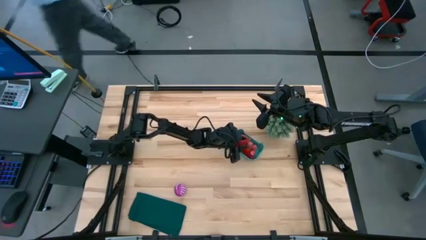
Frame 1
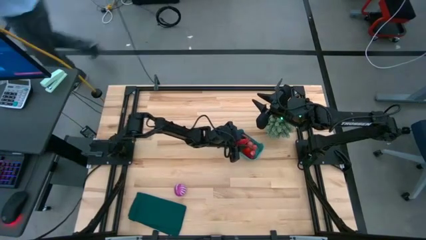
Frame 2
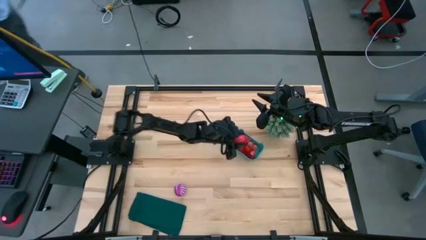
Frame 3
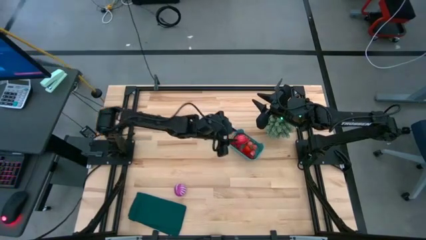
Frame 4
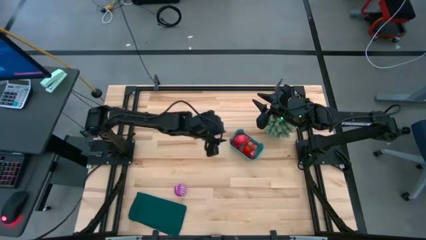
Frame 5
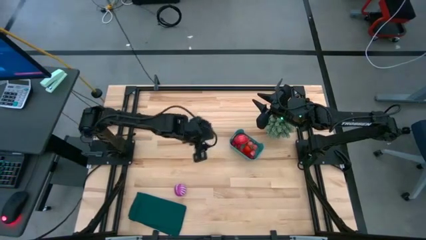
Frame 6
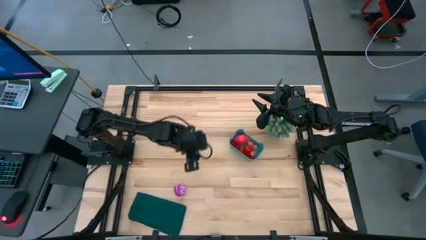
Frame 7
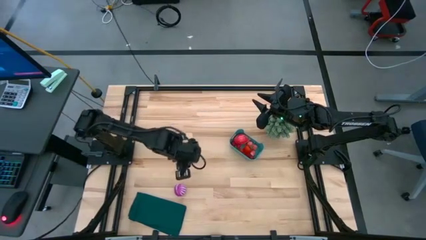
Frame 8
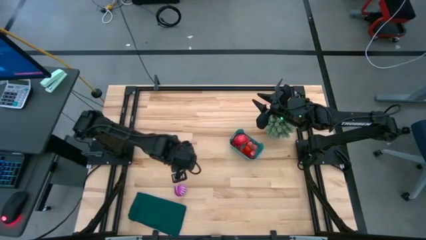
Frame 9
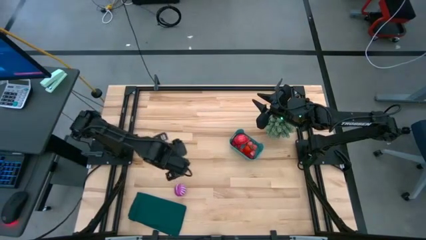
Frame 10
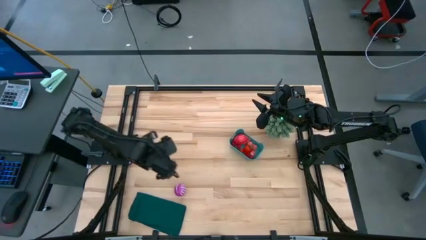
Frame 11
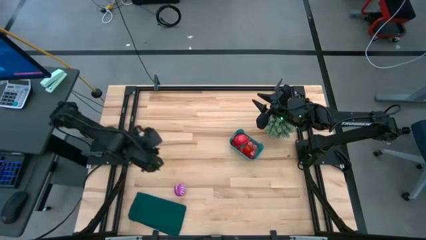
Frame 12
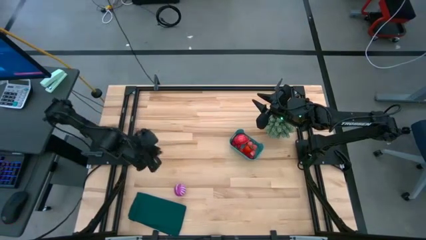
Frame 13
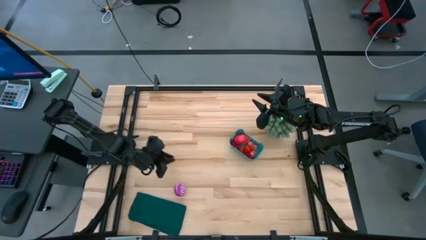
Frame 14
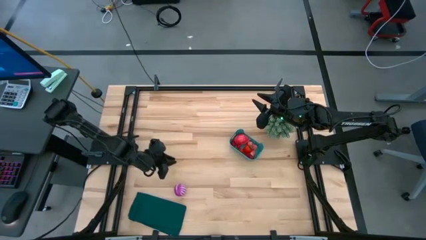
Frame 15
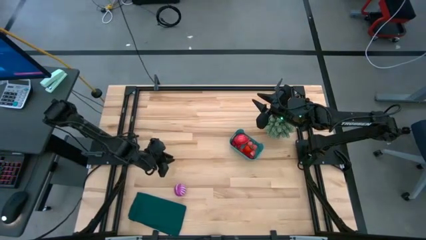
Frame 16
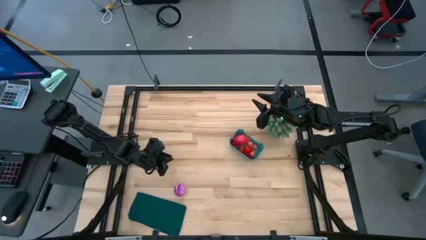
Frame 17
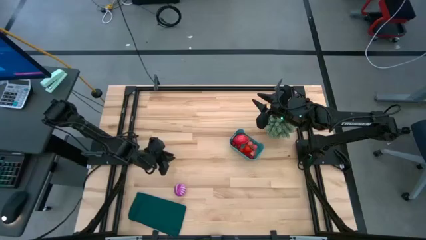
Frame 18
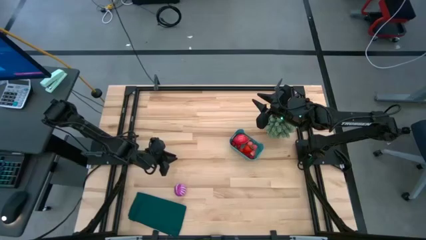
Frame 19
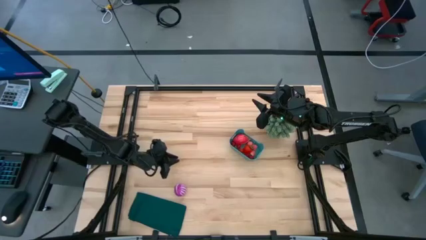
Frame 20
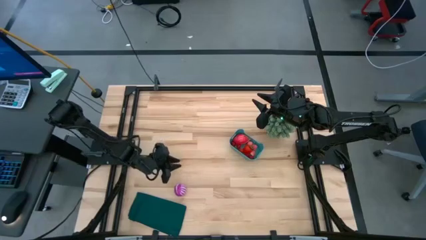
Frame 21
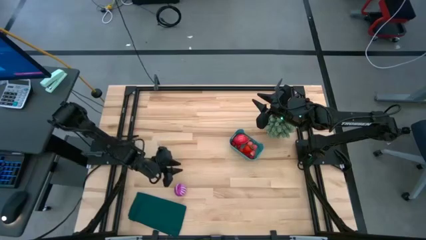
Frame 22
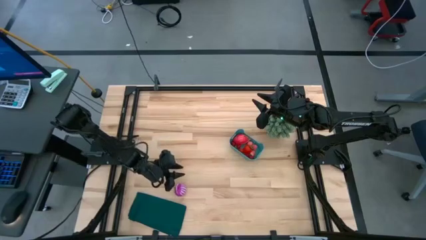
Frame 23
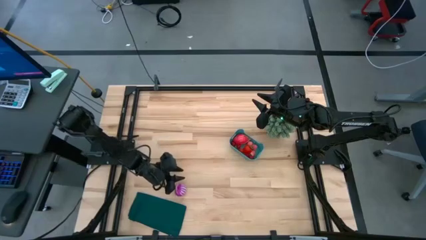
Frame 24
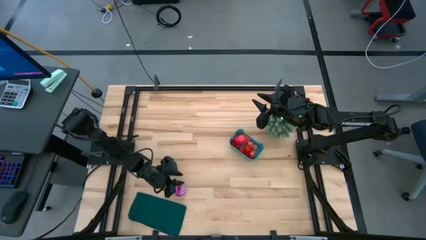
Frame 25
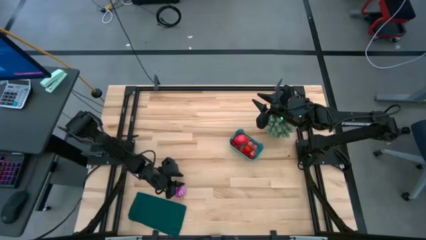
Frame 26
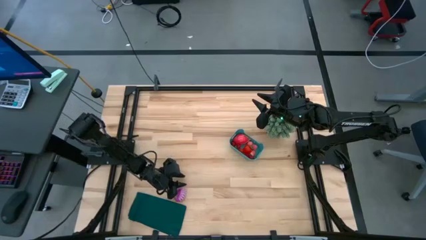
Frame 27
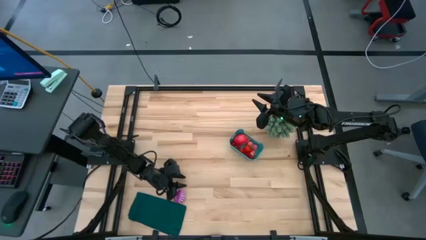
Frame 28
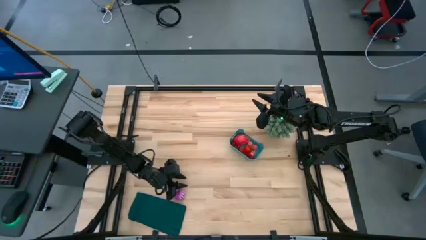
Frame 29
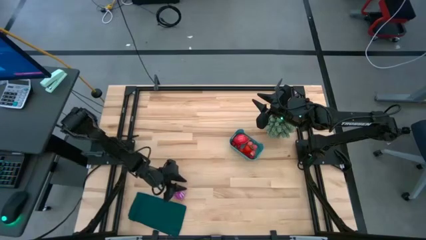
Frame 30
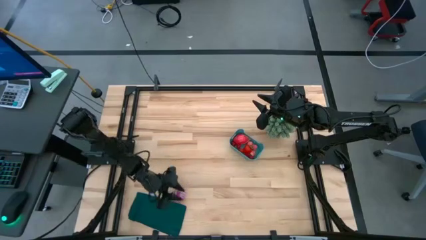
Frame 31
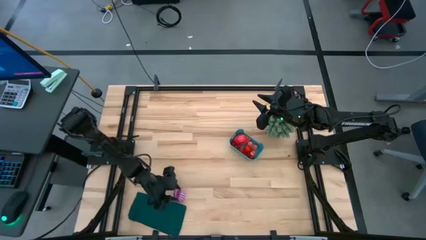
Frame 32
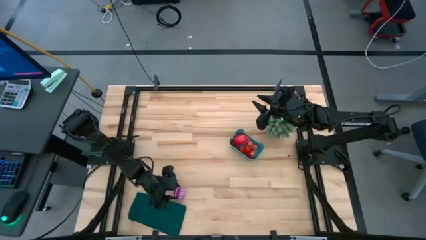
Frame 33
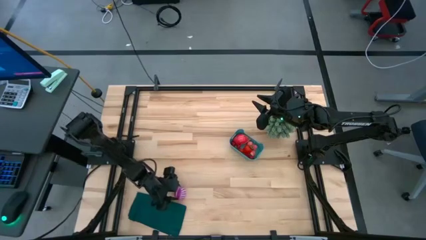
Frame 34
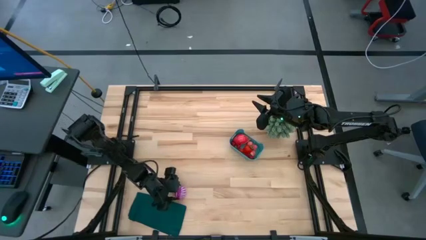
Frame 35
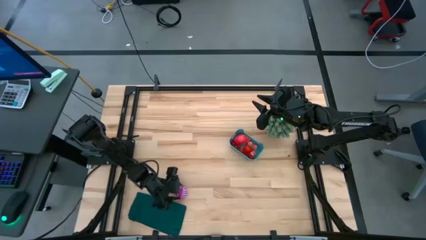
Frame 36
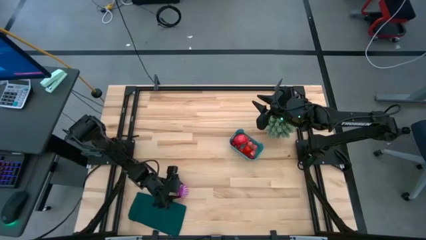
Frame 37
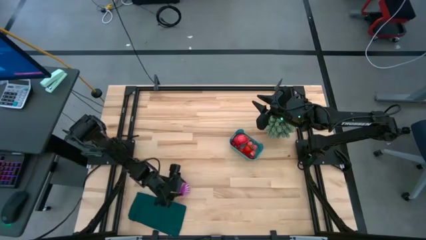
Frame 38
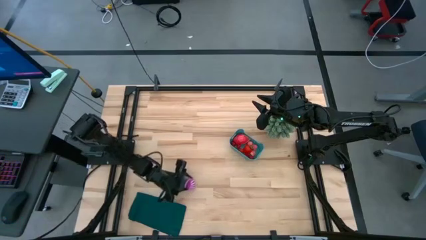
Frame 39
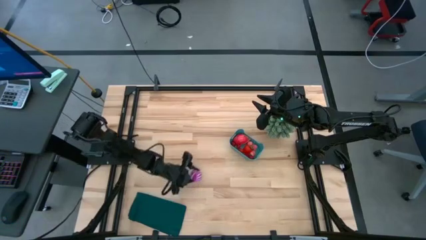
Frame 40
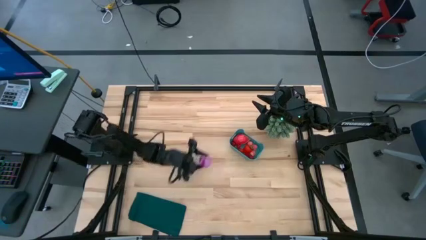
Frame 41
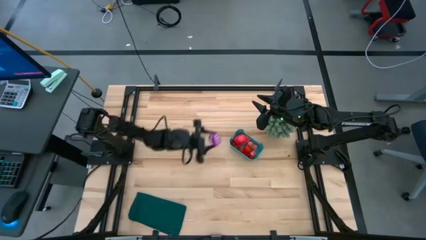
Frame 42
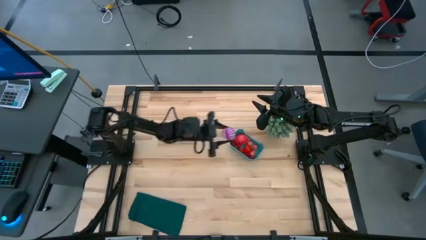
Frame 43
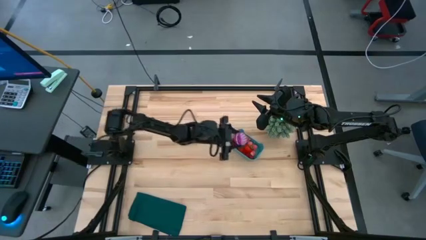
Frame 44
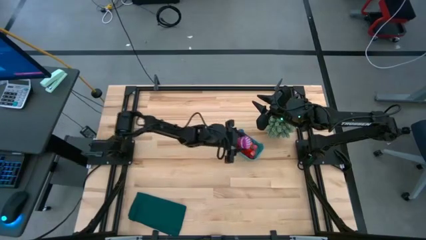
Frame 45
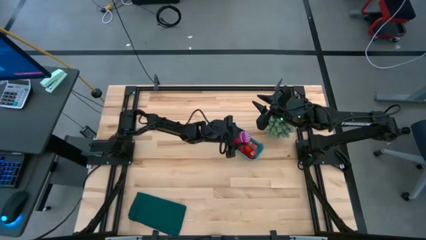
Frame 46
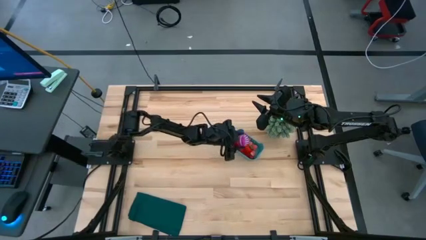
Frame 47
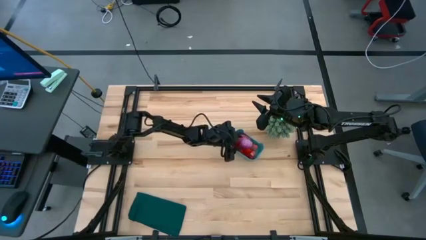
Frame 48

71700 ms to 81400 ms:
Task: Pick and placing Produce into tupperware
Put the onion into the green bin

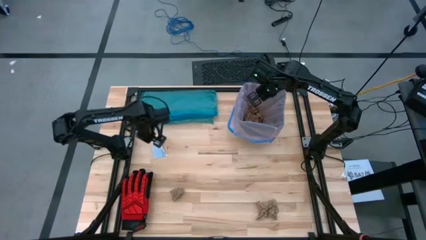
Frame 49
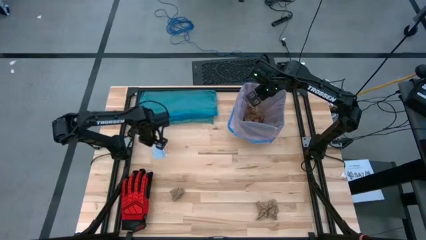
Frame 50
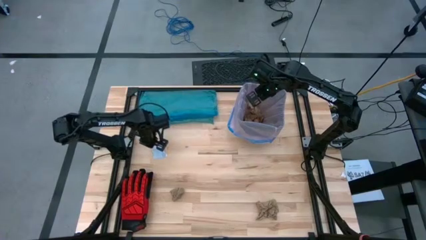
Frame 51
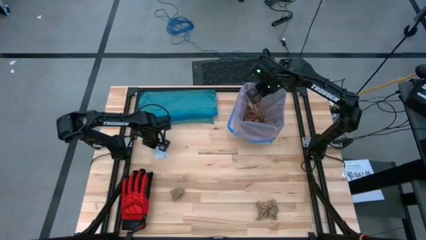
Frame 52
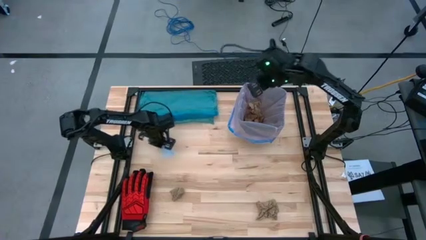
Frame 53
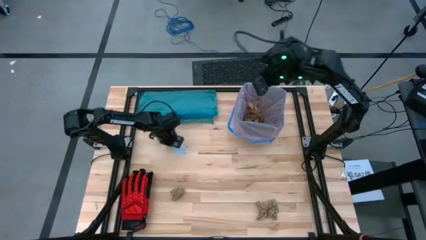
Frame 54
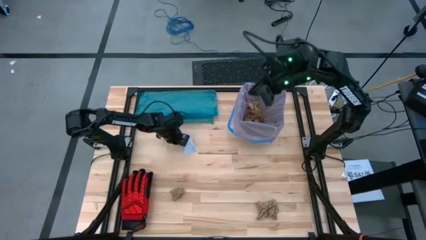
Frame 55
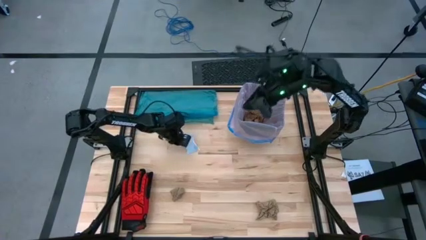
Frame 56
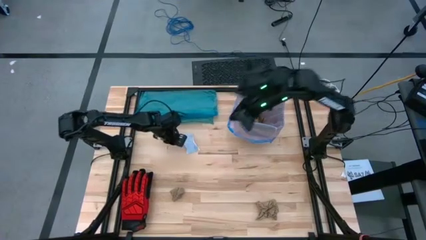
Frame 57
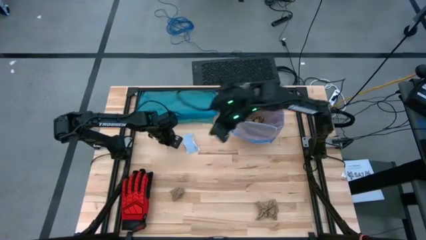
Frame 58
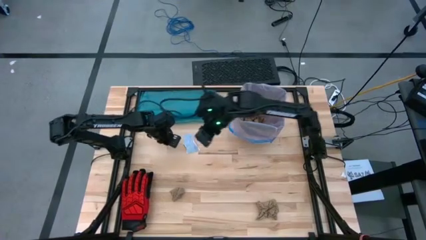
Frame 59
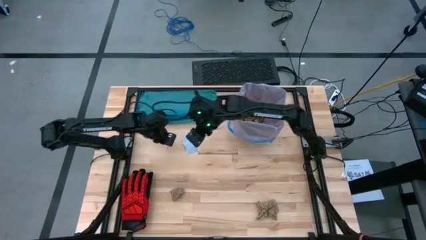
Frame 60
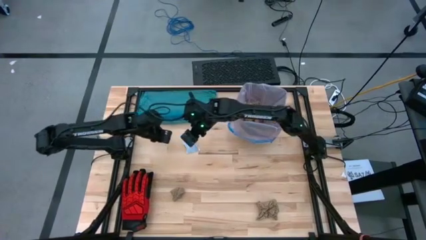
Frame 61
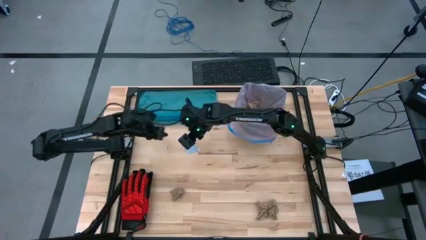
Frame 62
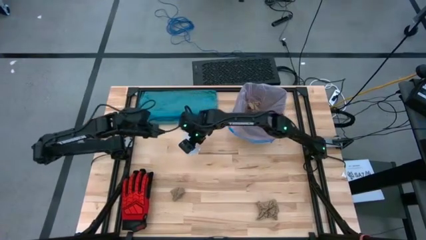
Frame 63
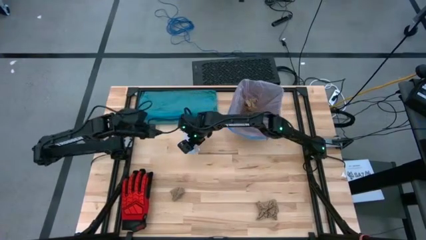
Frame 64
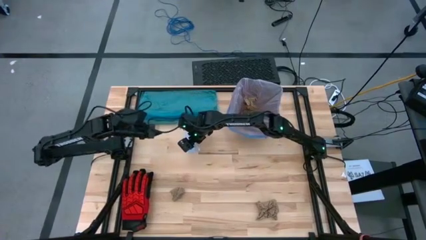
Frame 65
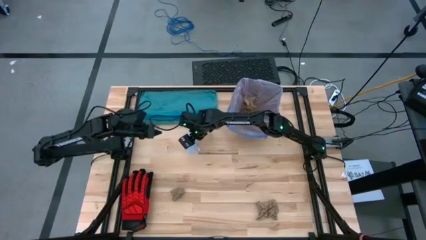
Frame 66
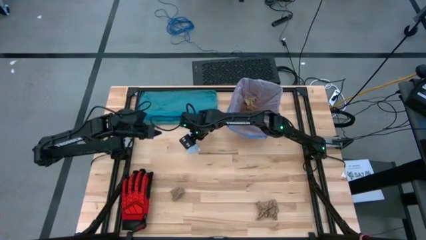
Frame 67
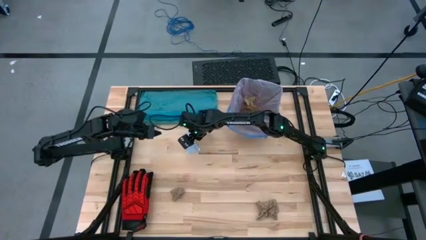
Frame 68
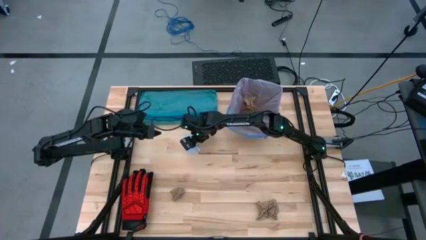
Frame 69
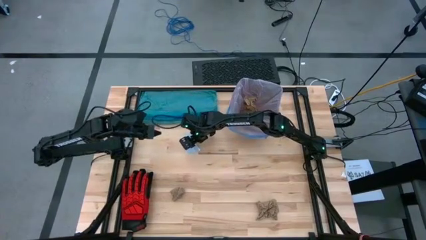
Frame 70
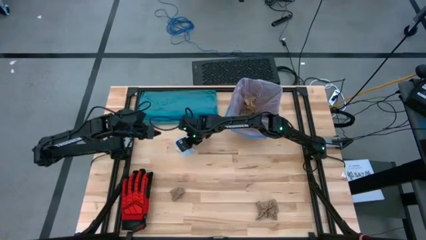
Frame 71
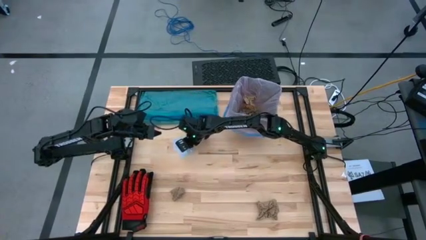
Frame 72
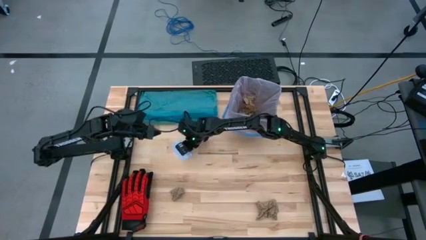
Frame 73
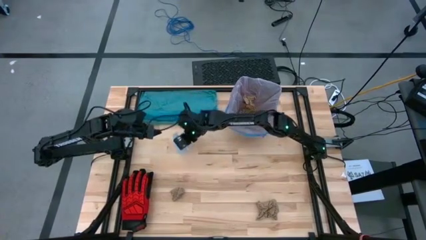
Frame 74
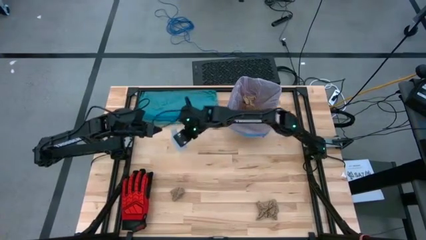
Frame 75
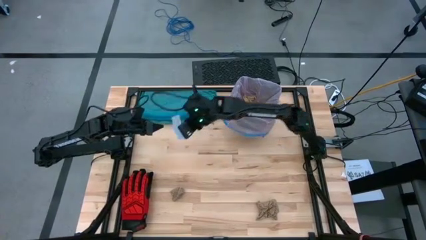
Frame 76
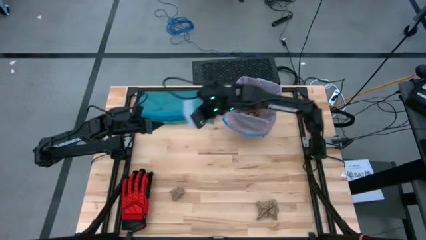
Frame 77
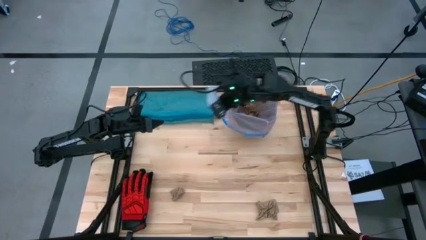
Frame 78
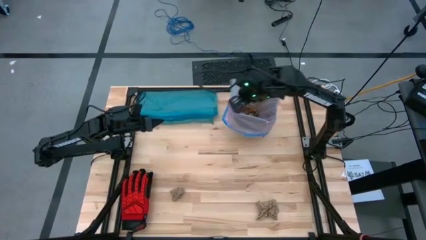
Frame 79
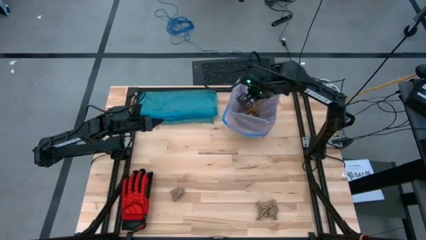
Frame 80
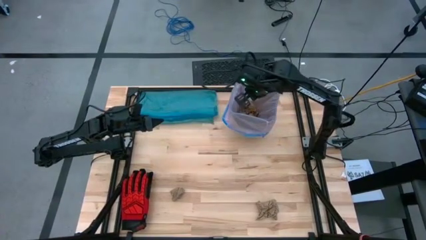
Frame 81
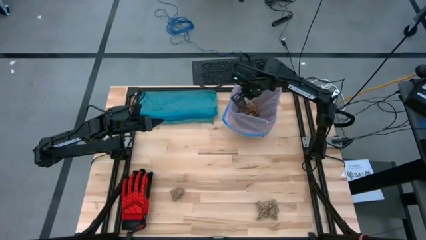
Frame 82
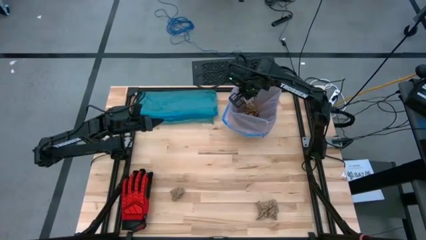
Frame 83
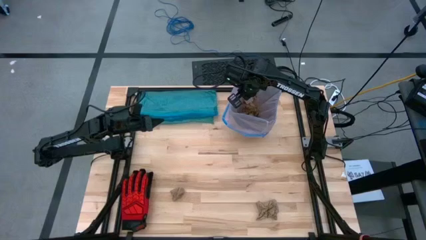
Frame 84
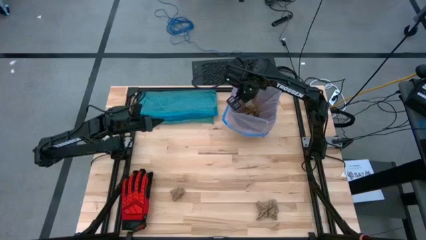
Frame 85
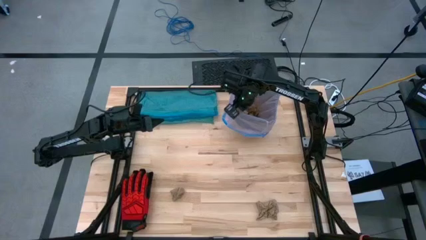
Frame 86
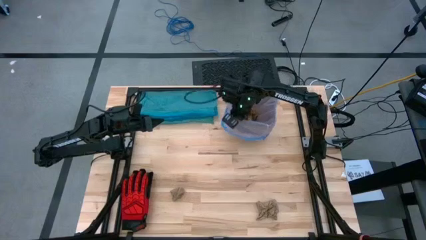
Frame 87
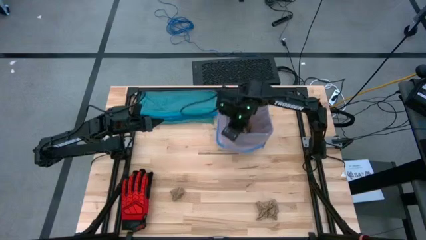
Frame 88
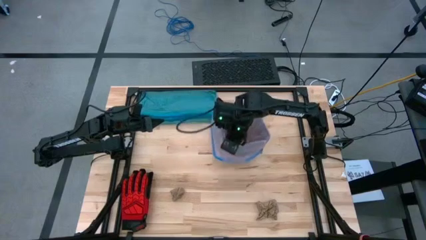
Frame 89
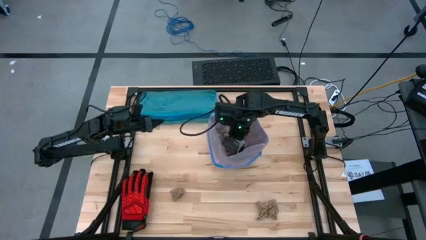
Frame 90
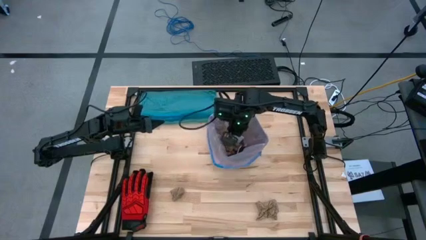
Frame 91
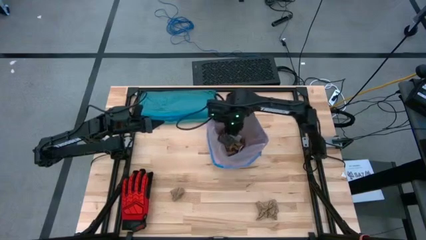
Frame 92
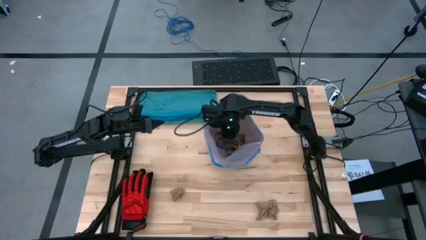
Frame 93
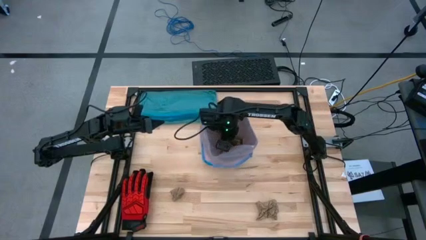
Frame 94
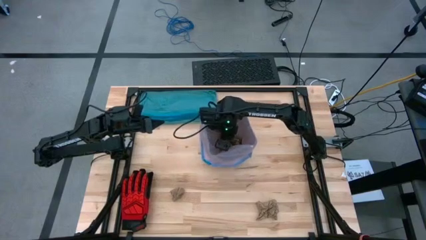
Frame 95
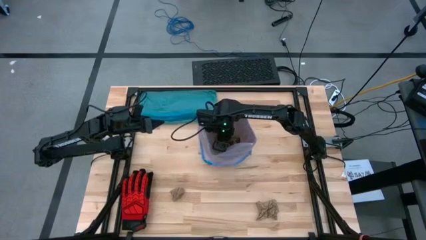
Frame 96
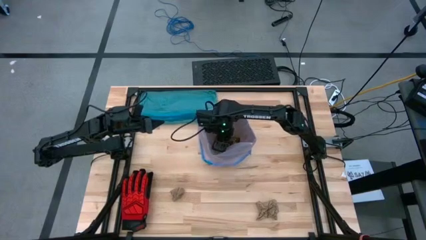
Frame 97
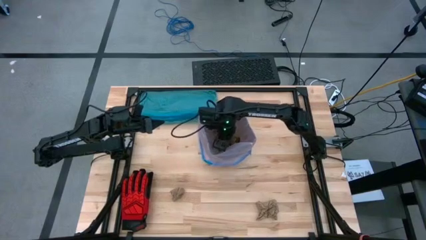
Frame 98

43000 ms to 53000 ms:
Task: place trash/remove bag and relplace
Put the gray paper into the trash bin
